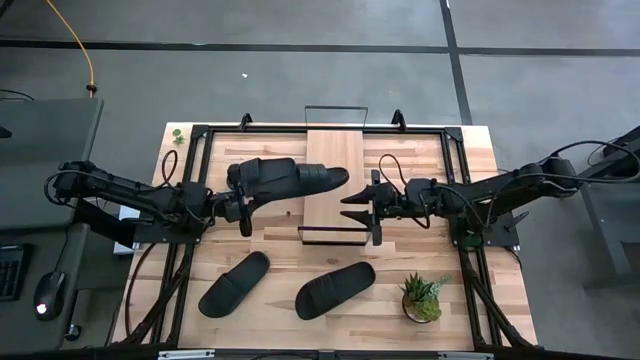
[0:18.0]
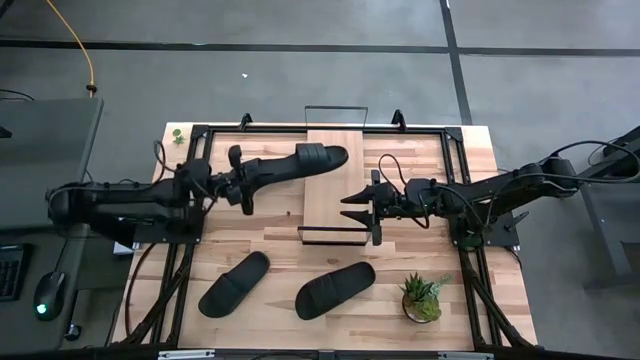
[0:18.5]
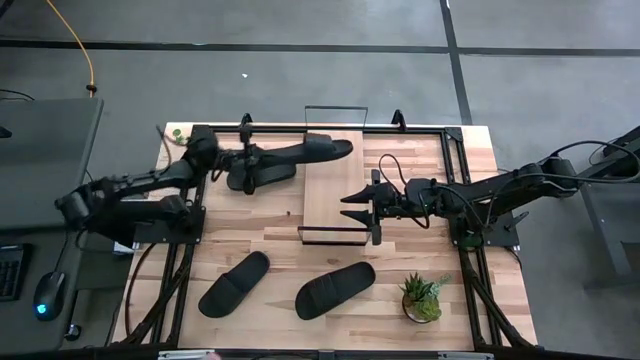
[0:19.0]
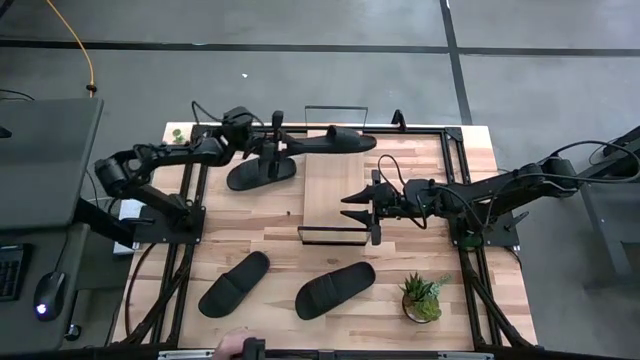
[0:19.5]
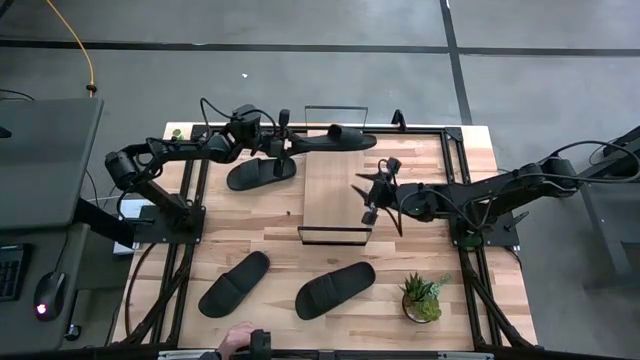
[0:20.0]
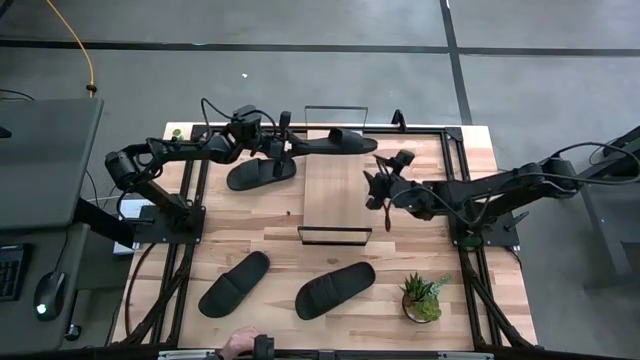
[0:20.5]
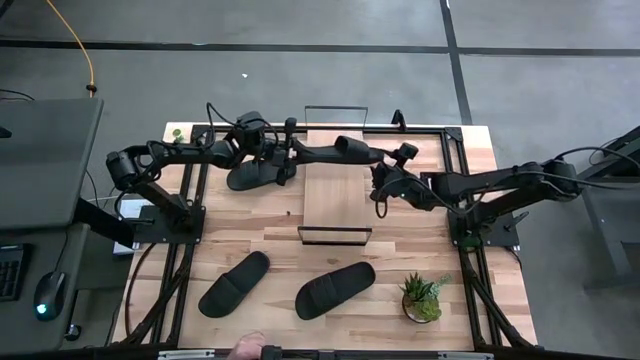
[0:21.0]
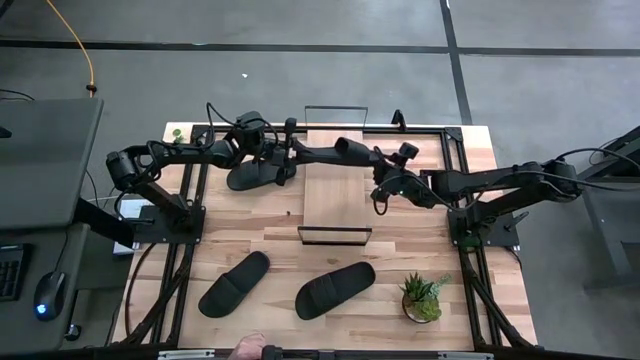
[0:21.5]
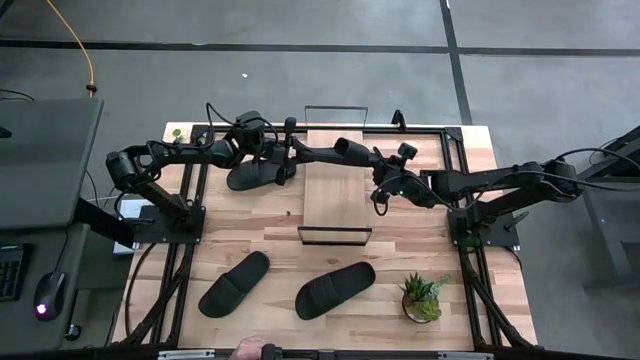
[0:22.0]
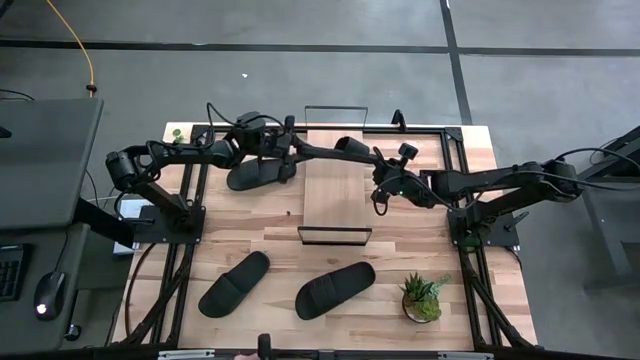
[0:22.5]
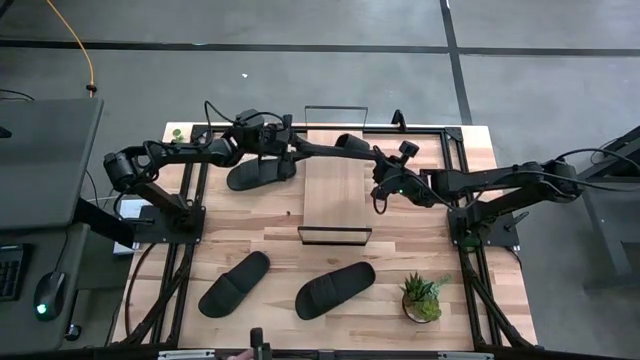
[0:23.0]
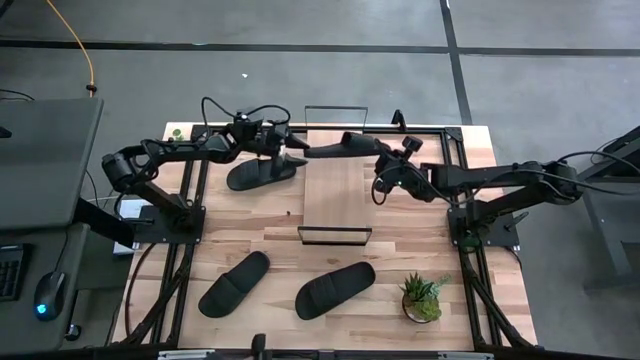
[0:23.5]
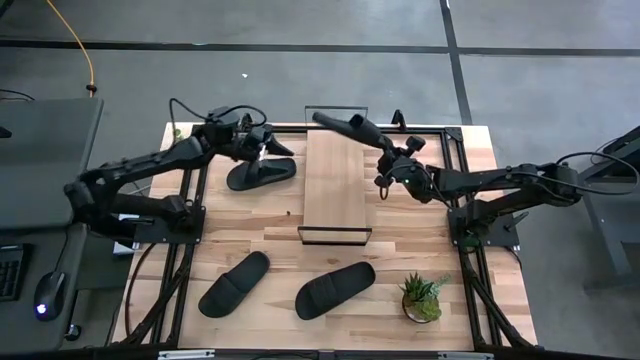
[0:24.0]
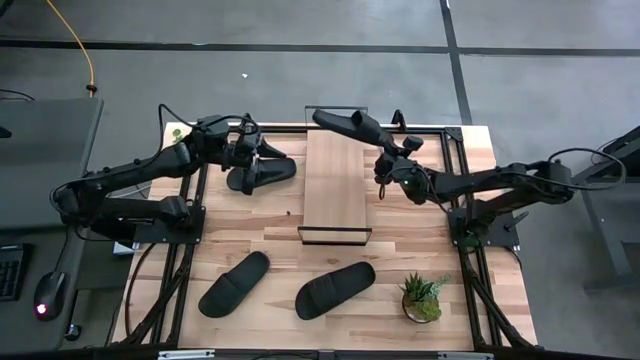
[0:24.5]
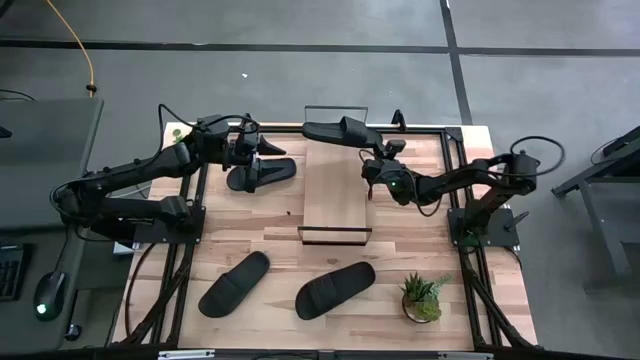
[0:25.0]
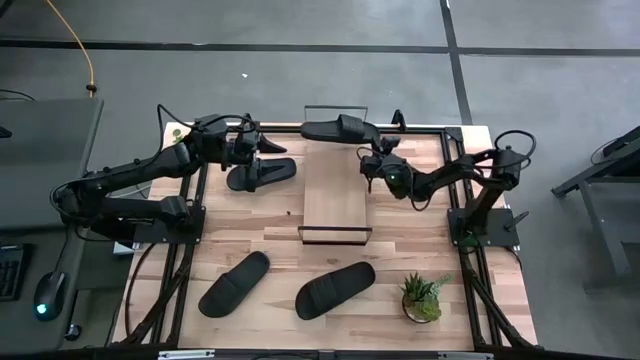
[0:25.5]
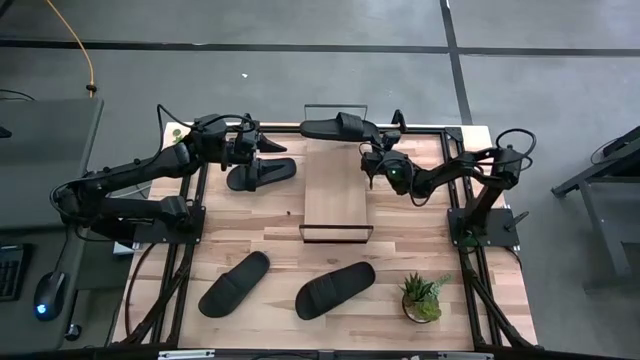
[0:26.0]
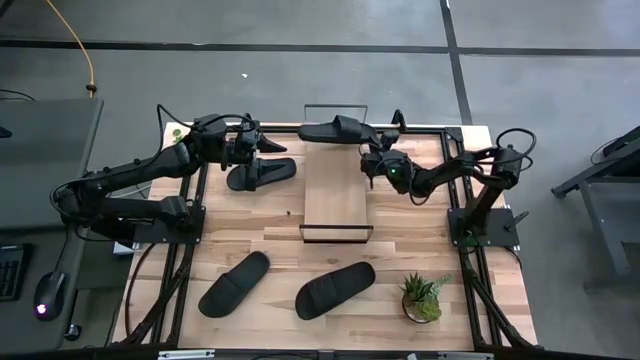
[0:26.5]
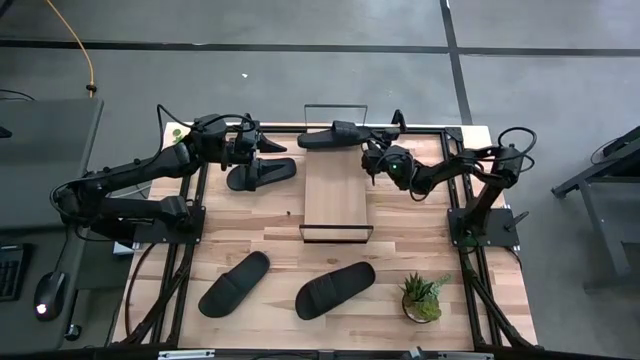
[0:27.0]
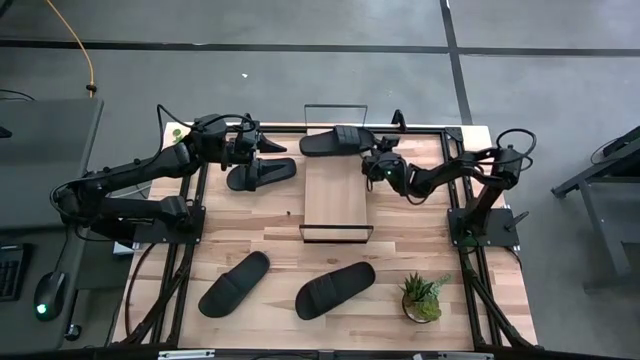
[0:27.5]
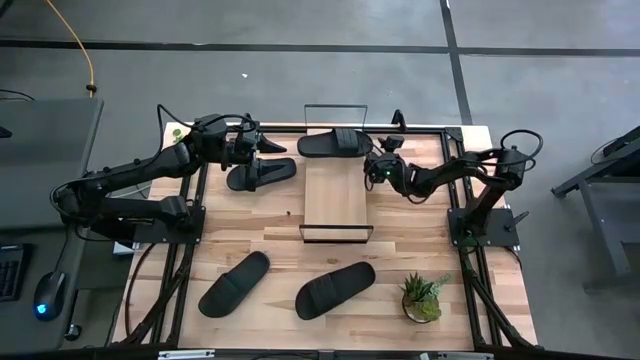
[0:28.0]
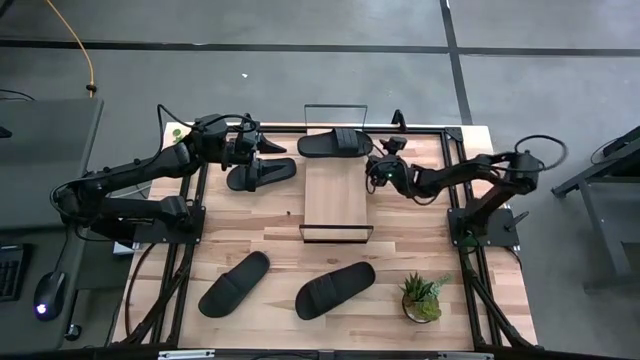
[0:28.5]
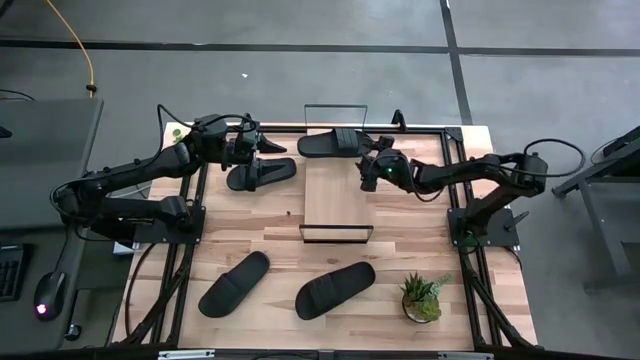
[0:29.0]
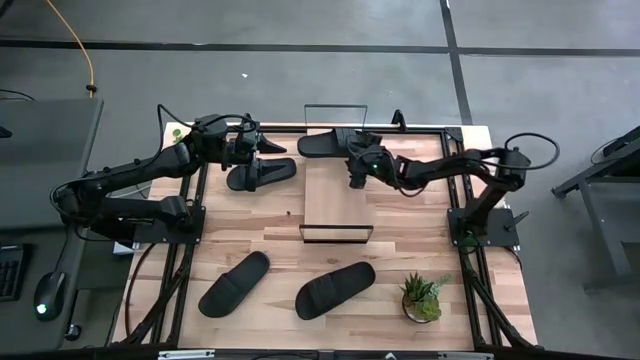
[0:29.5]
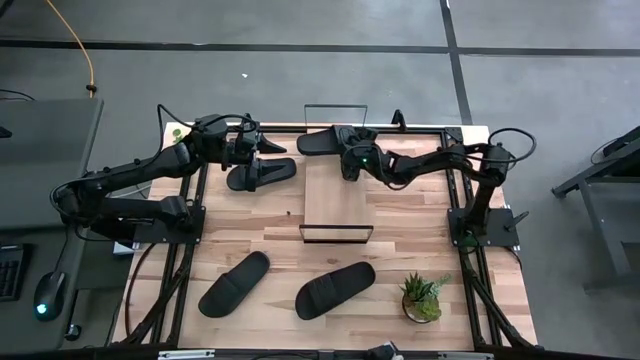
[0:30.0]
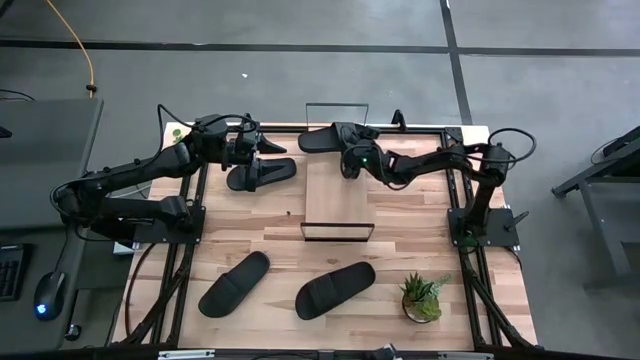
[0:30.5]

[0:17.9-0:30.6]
Task: Pick and place slides into the shelf
Put the black slide on the shelf

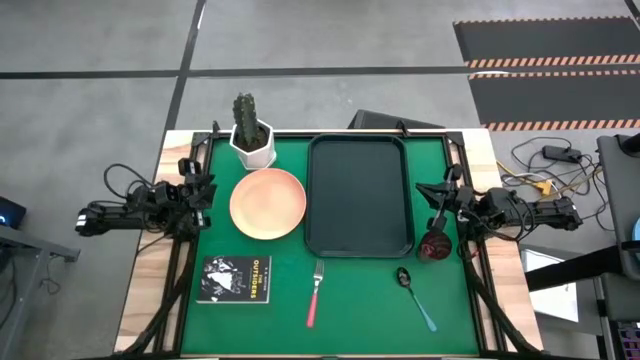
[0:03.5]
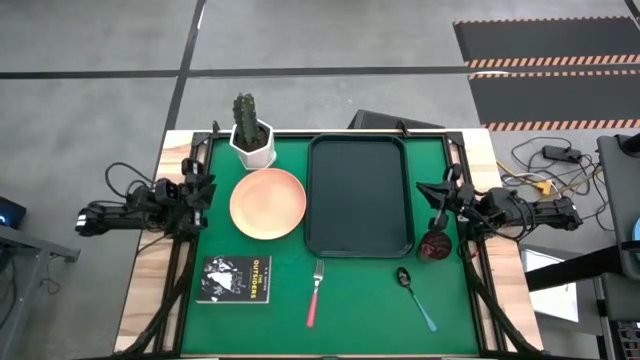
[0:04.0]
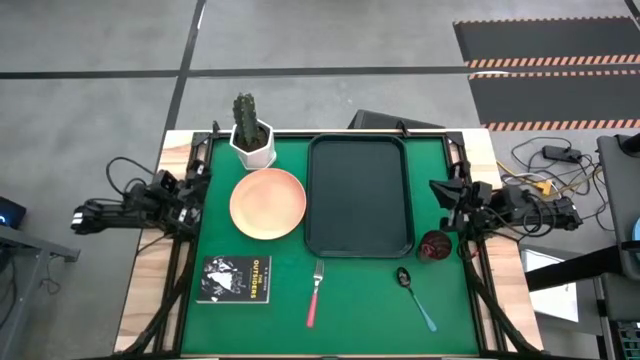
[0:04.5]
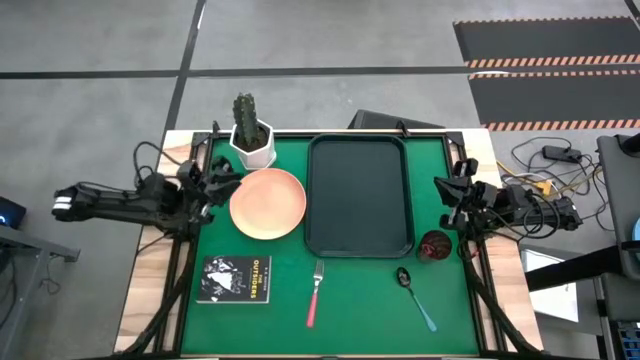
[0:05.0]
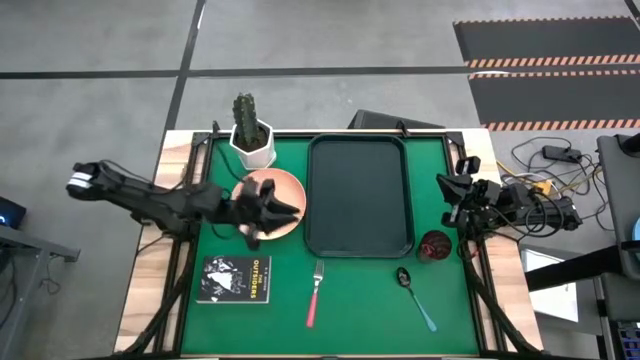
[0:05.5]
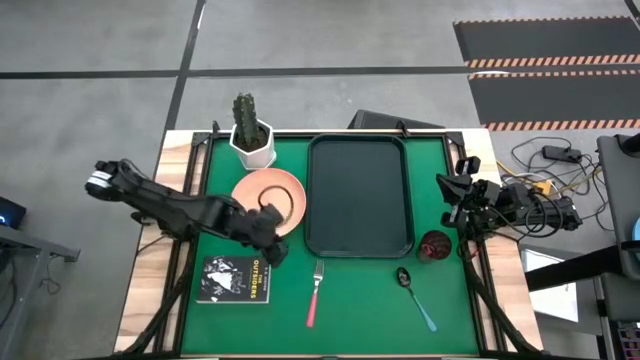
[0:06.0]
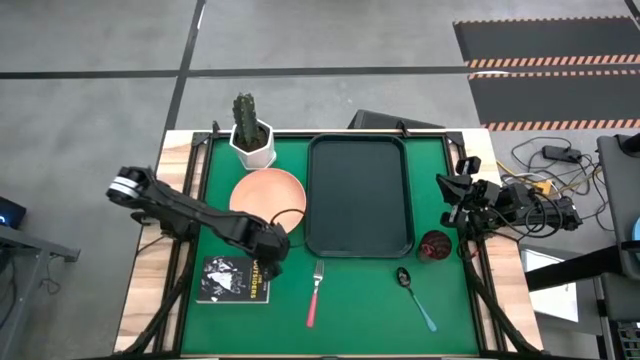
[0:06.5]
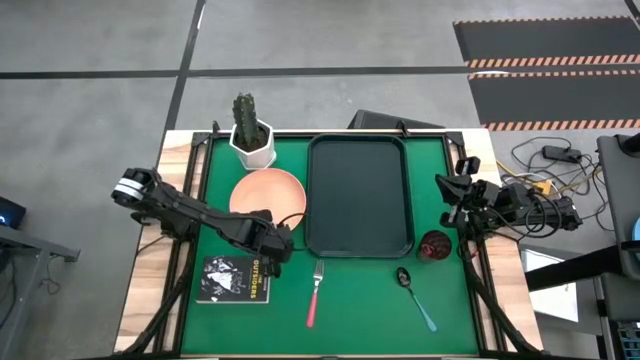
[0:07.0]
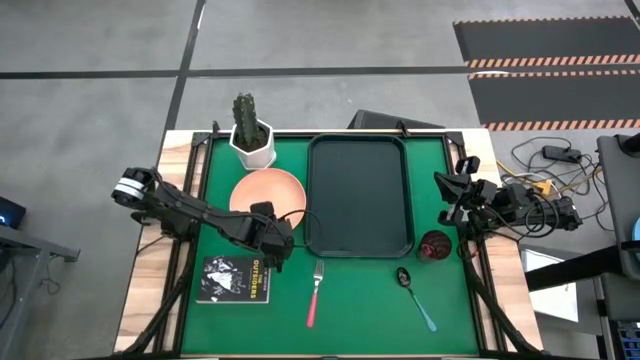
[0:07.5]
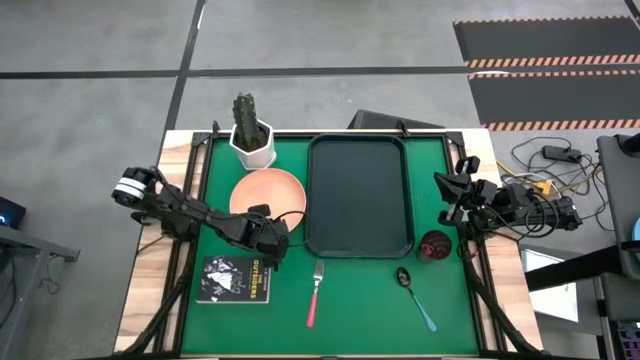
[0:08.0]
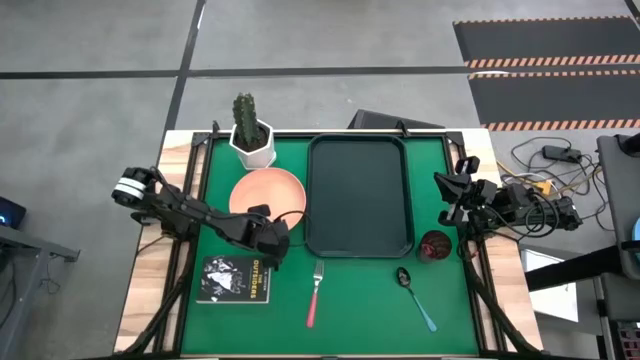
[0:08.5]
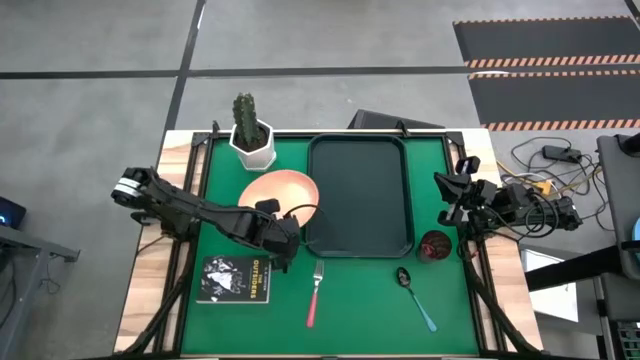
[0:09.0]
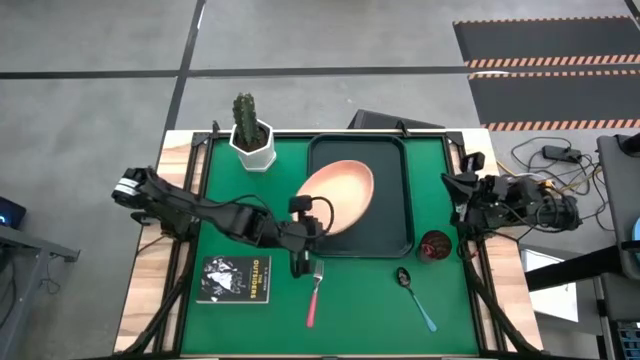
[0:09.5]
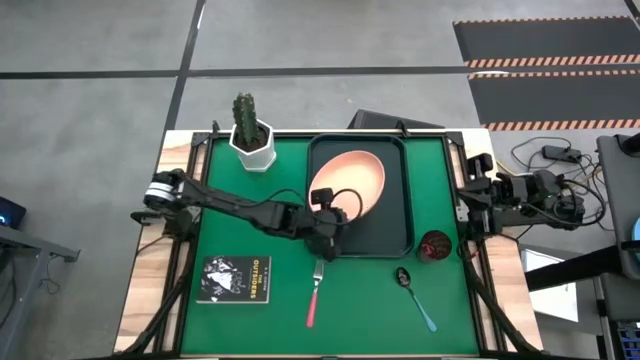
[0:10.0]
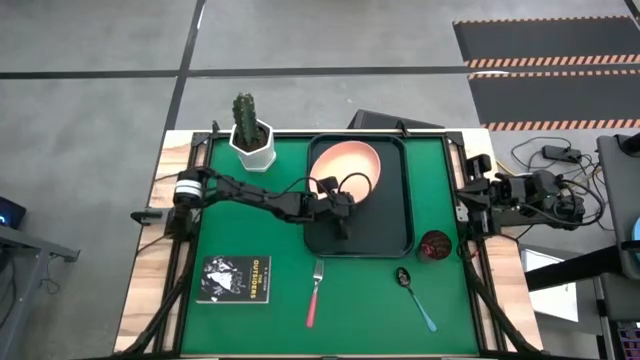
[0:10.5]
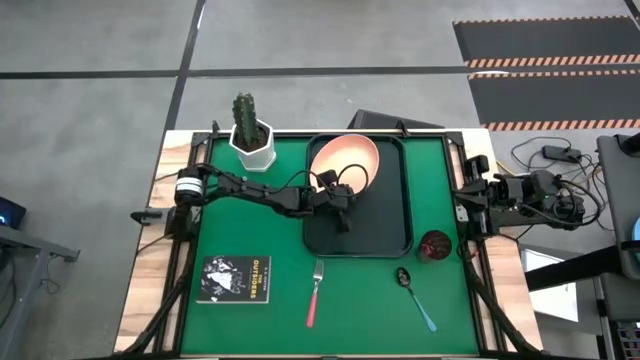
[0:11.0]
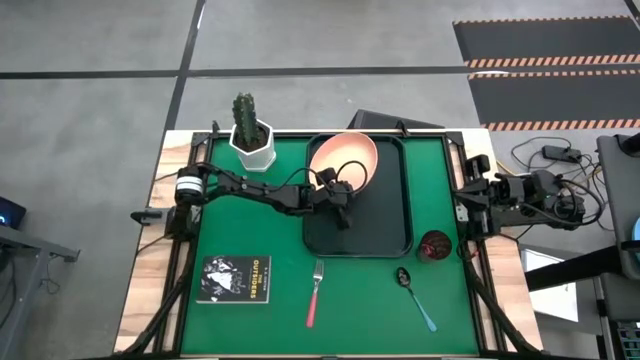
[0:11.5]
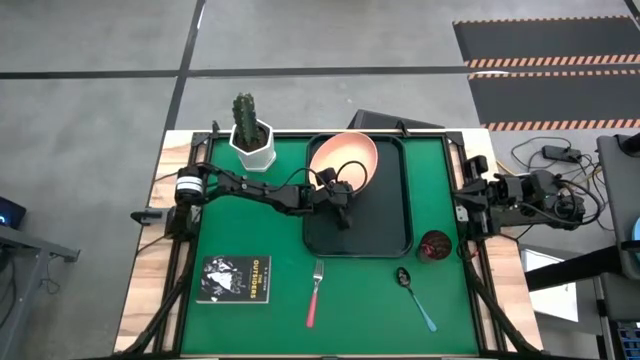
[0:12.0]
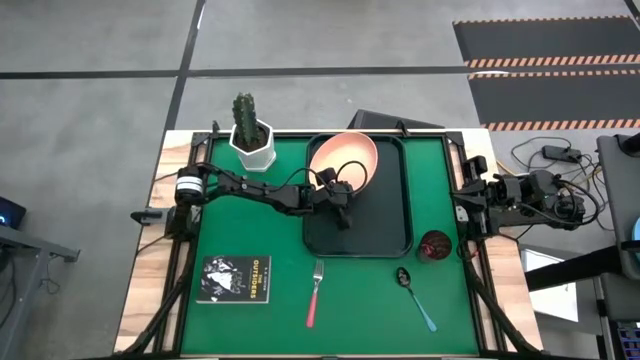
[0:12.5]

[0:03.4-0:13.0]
Task: Pick and place plate/cup/fork/spoon on tray
Put the light orange plate on the black serving tray
